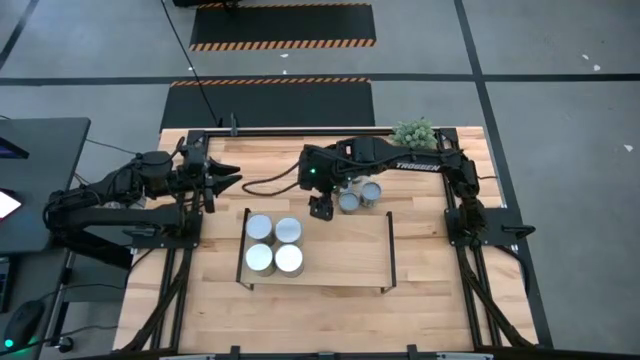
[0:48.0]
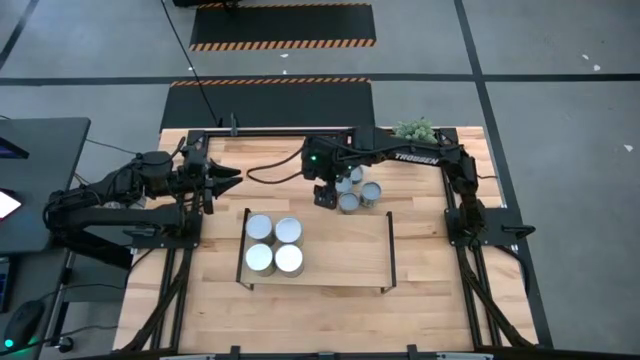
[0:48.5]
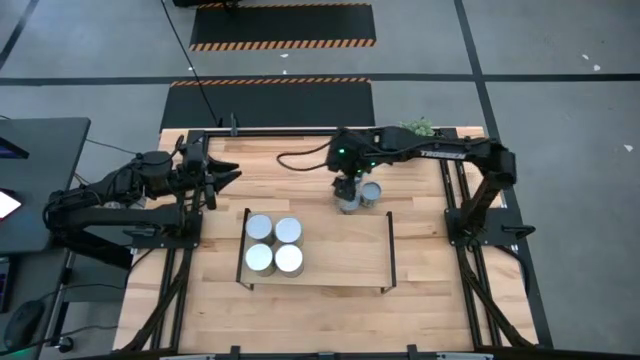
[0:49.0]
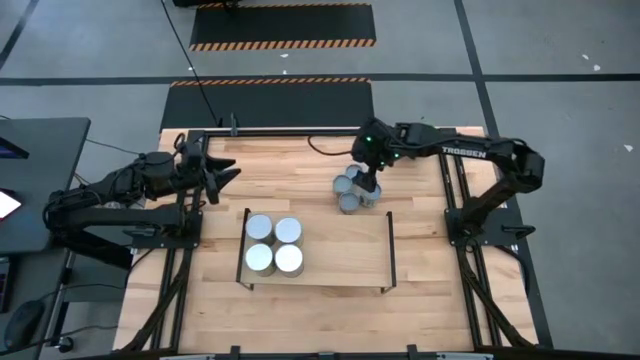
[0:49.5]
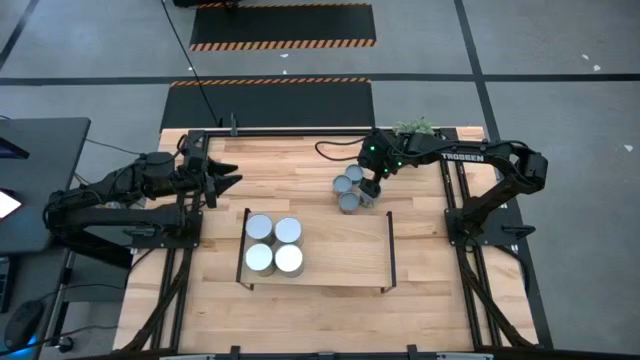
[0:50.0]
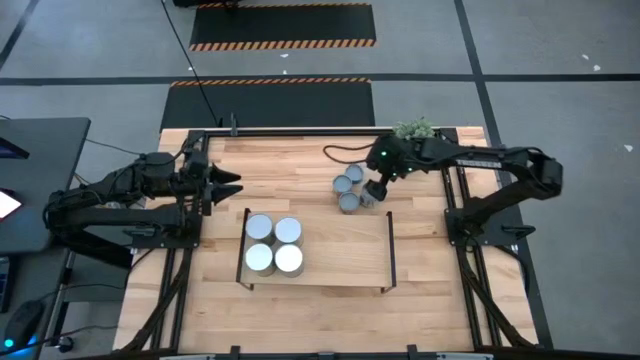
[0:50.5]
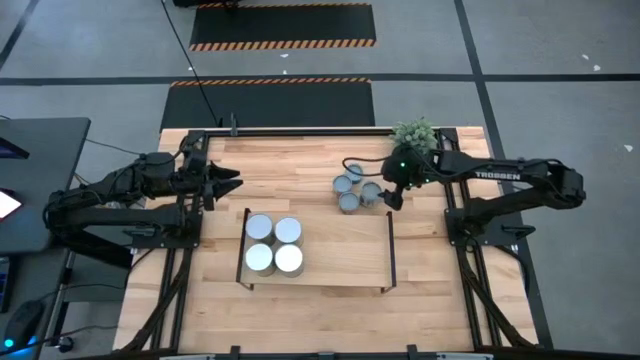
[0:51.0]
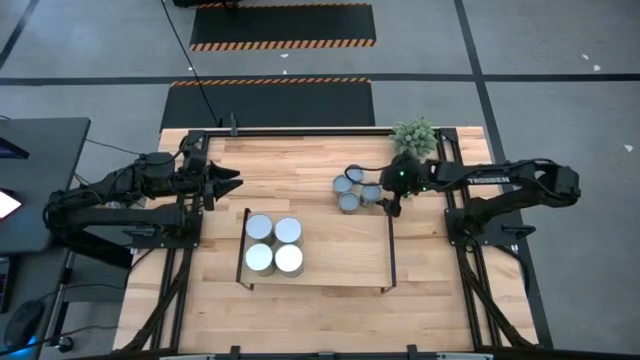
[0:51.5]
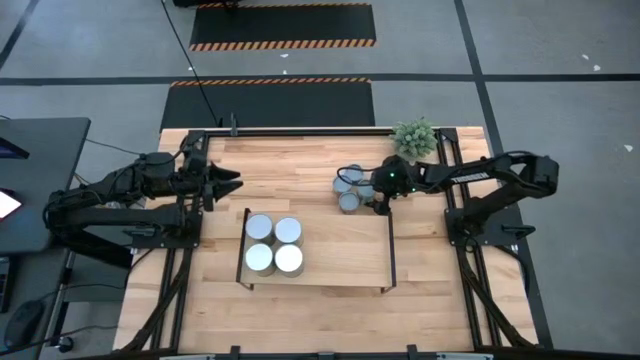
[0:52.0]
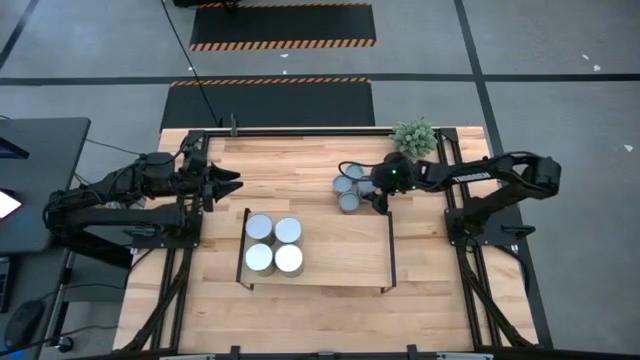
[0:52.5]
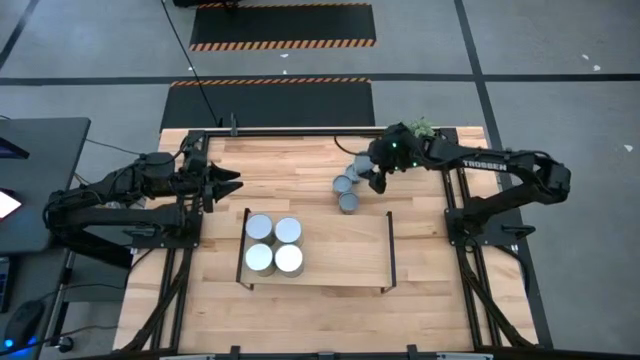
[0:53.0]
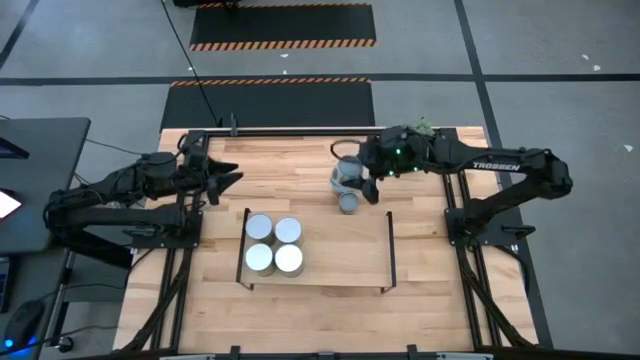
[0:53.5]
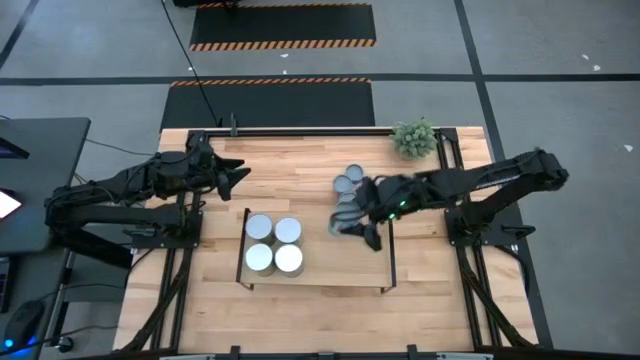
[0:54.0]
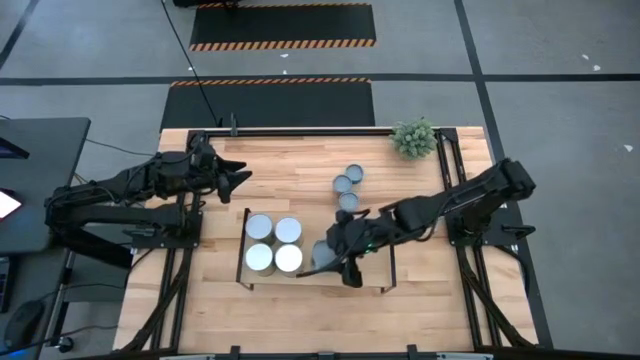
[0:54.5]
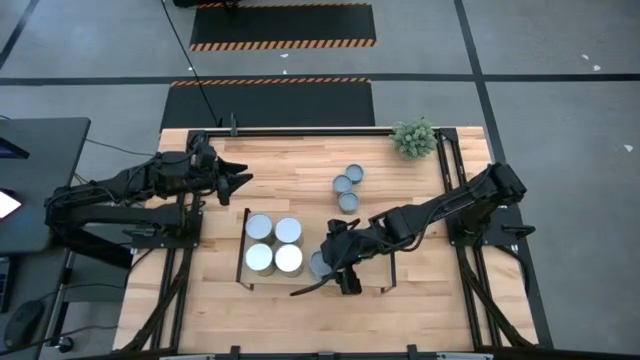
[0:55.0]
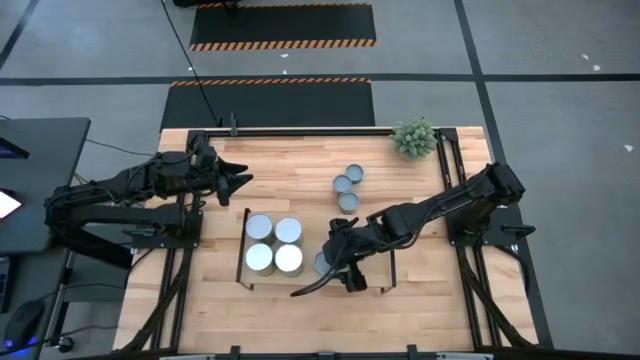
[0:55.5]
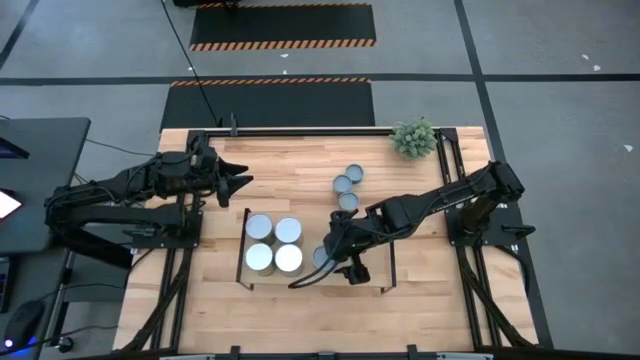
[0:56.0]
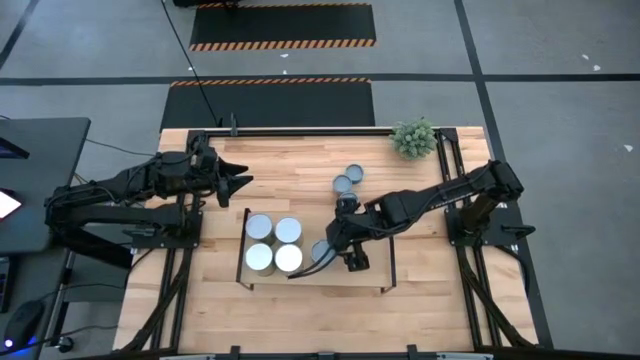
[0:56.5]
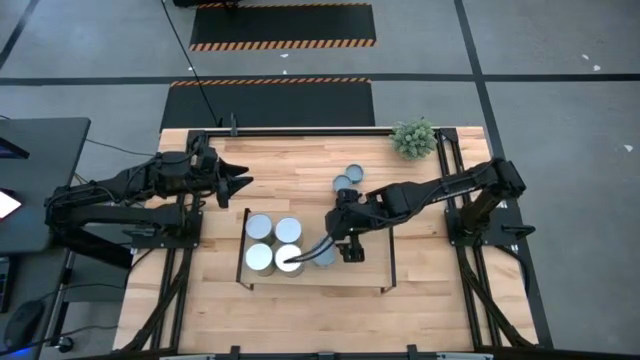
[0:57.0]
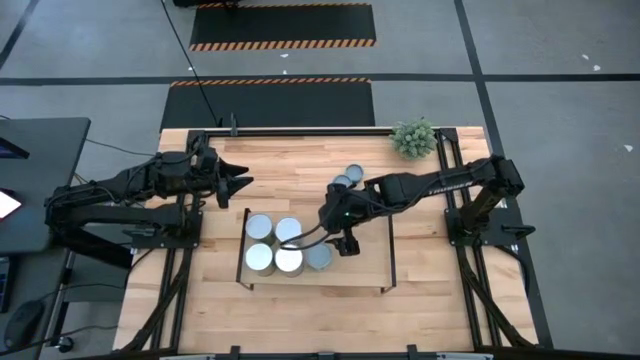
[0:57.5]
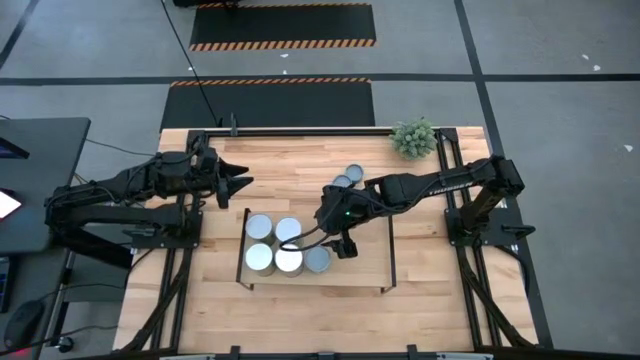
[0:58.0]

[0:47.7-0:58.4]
Task: Pick and place cans onto a shelf
Put the canned mixed vegetables on the shelf

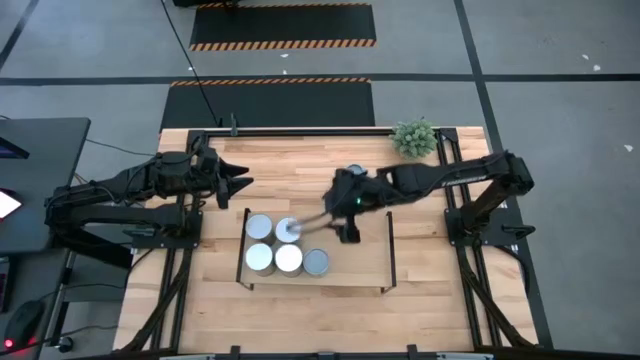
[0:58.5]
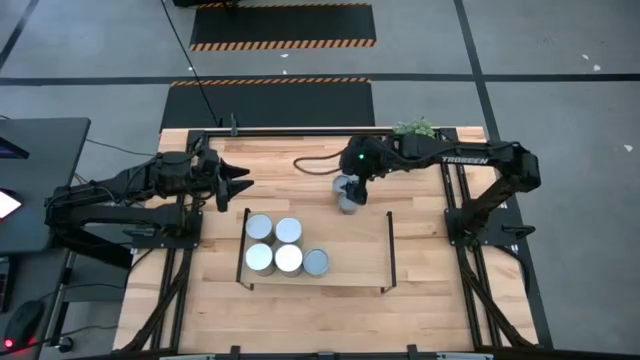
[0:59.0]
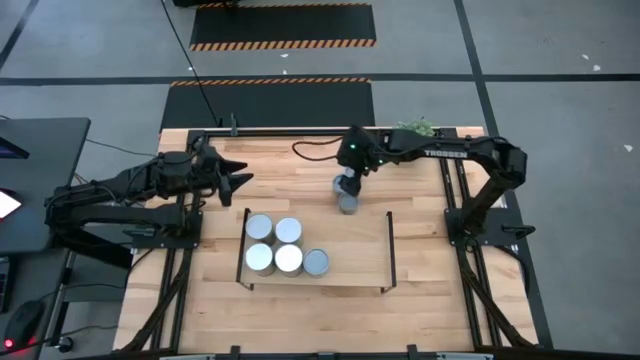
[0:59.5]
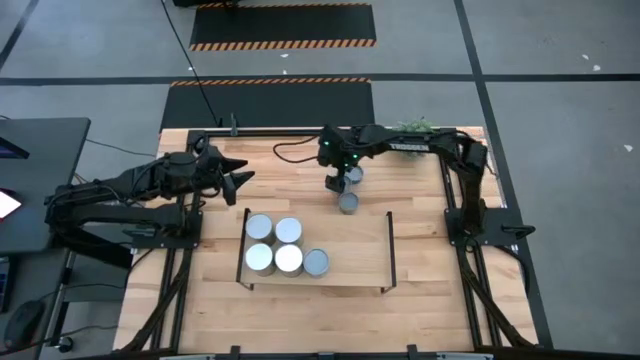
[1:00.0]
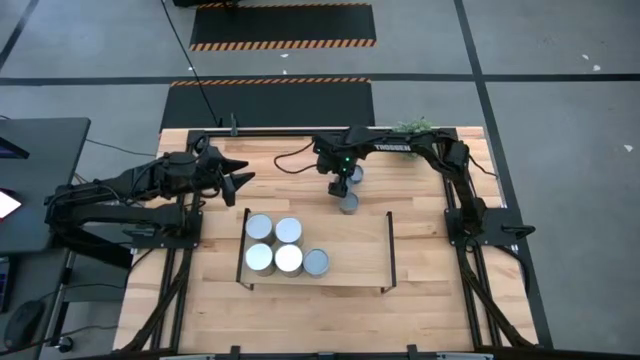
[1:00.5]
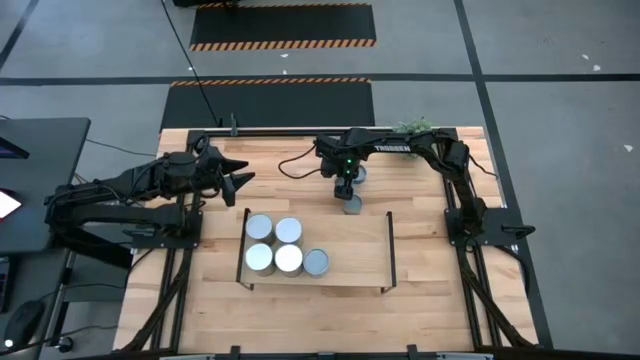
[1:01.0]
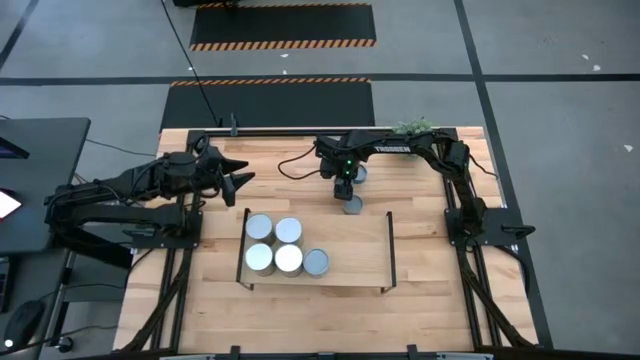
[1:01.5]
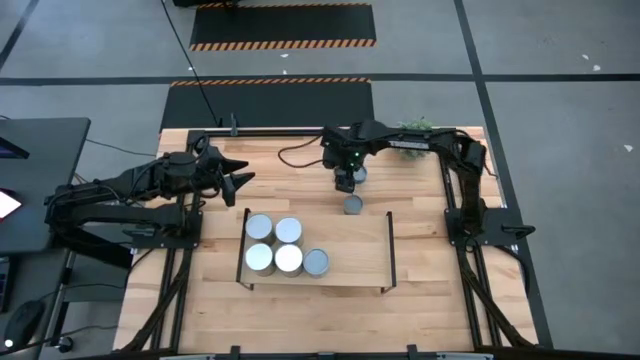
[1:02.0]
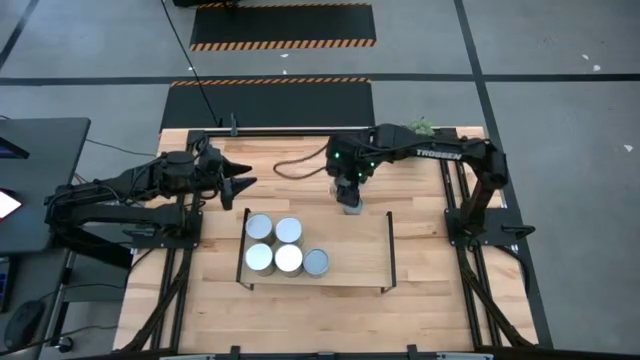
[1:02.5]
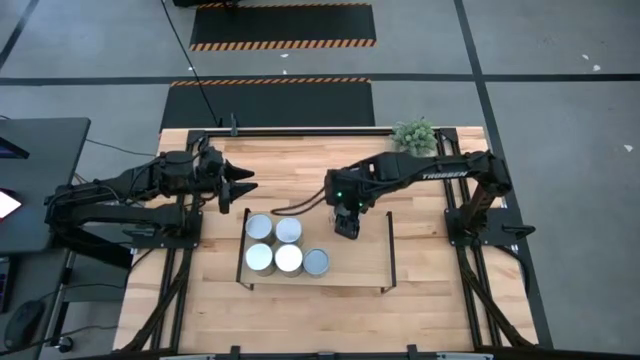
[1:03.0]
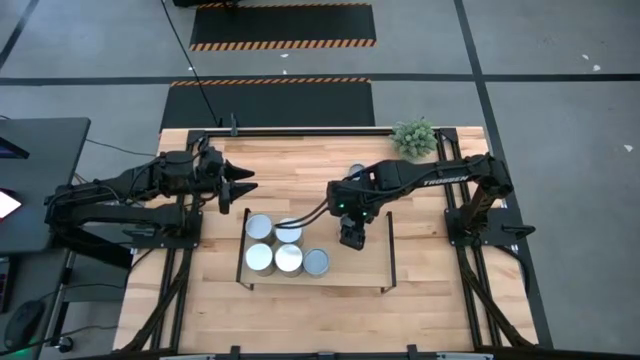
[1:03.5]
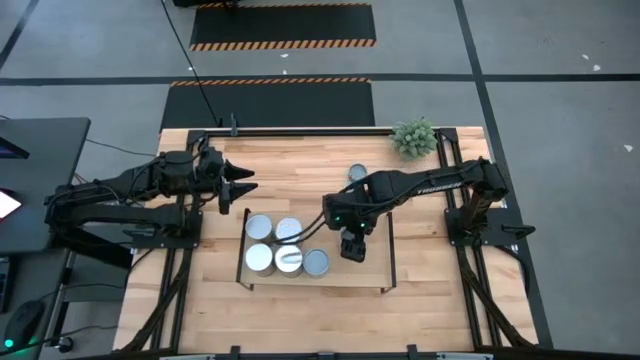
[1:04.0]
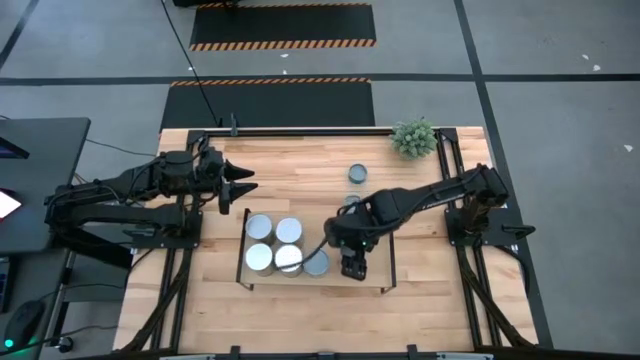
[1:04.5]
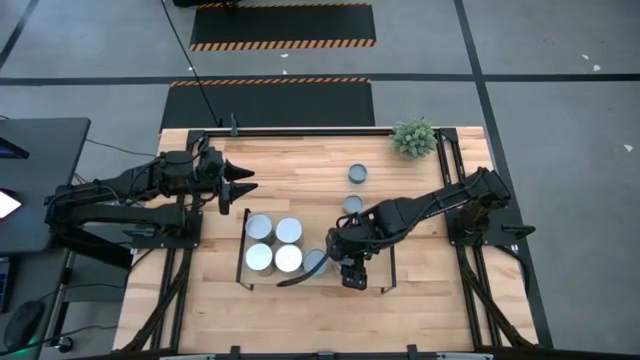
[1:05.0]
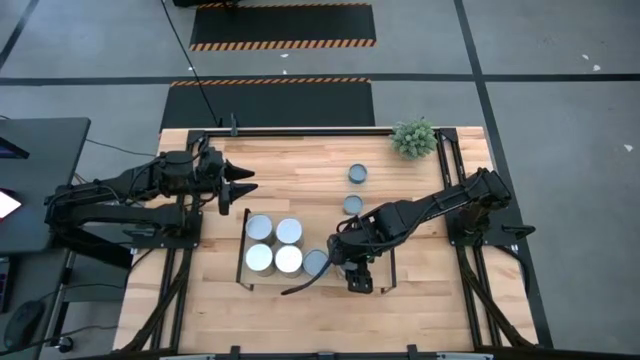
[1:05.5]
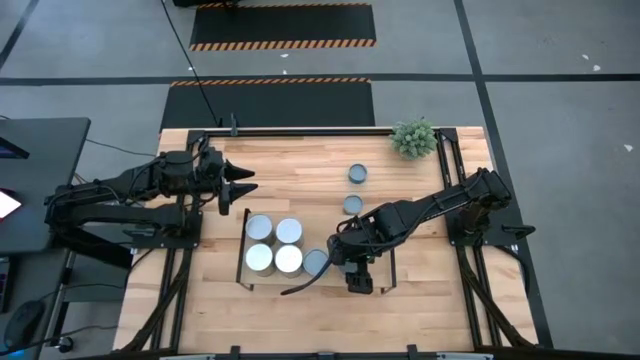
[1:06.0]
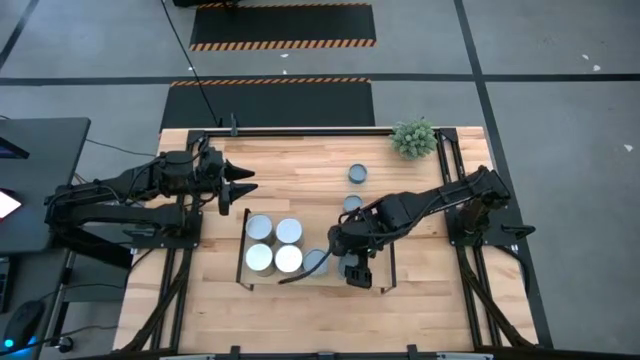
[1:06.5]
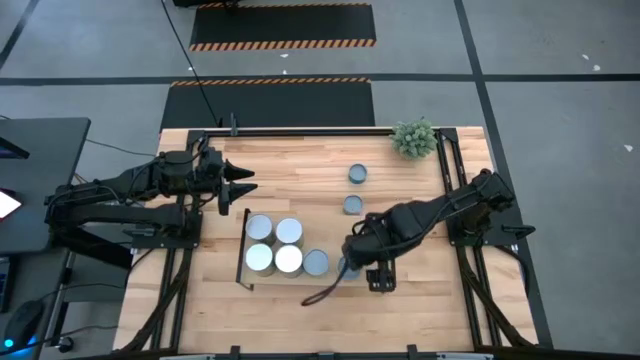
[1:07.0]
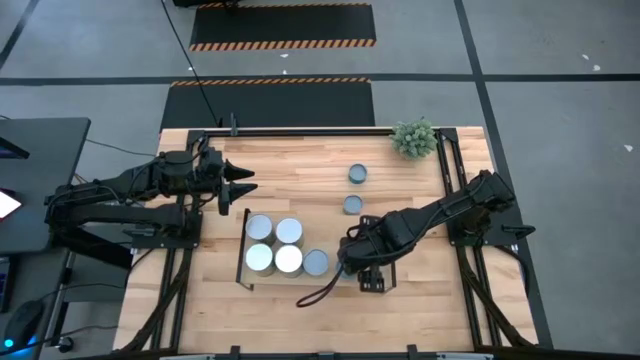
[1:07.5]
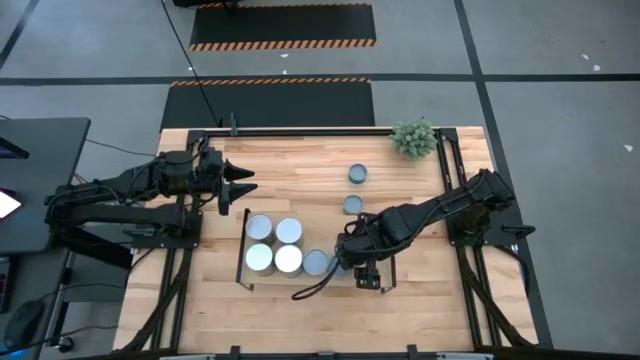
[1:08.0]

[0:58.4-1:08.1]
Put the canned tomatoes on the shelf
